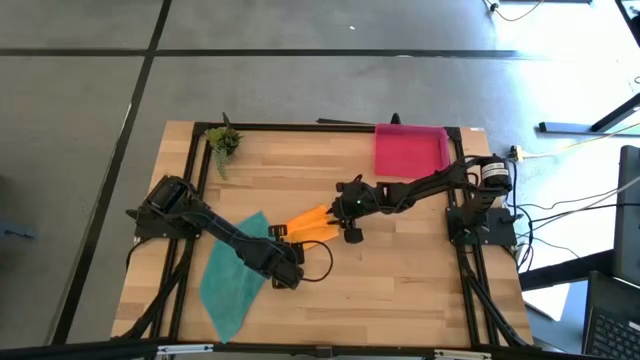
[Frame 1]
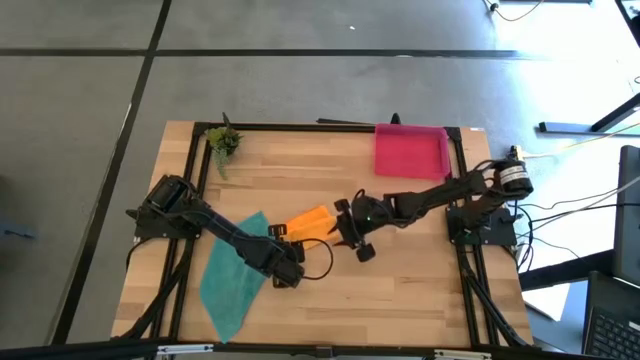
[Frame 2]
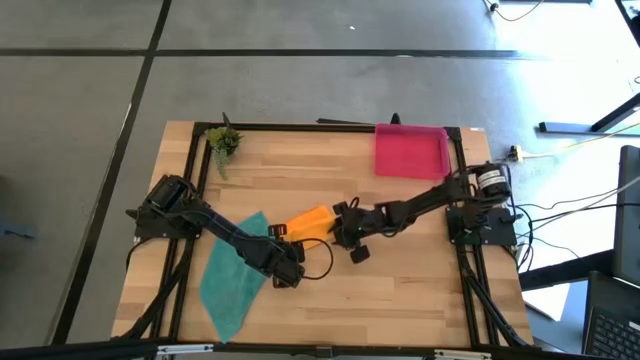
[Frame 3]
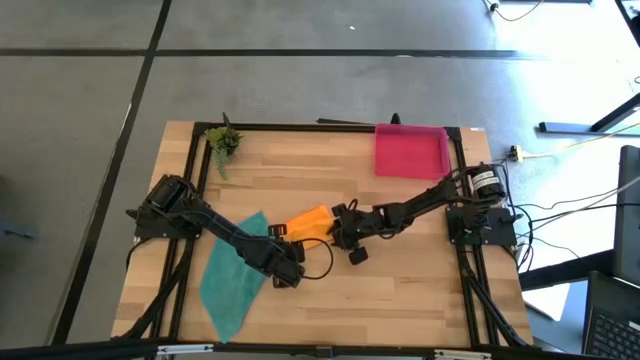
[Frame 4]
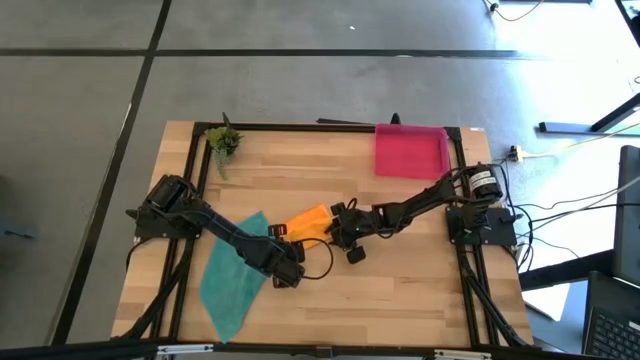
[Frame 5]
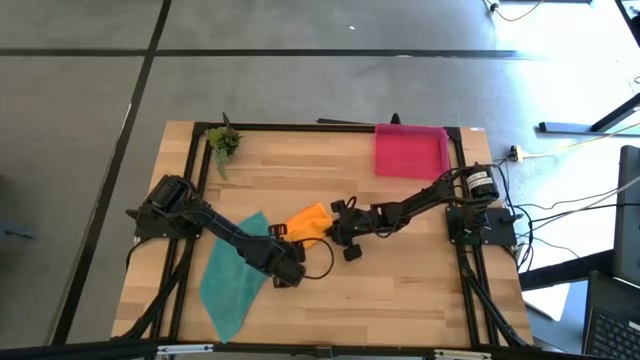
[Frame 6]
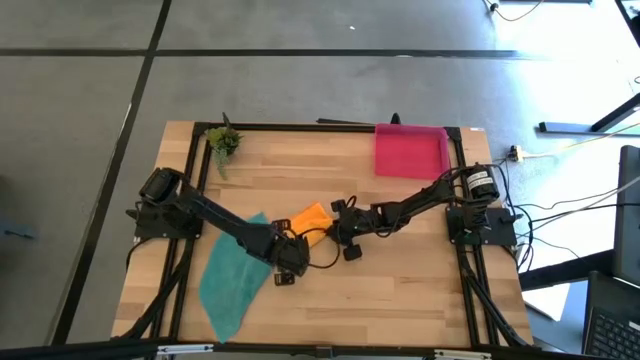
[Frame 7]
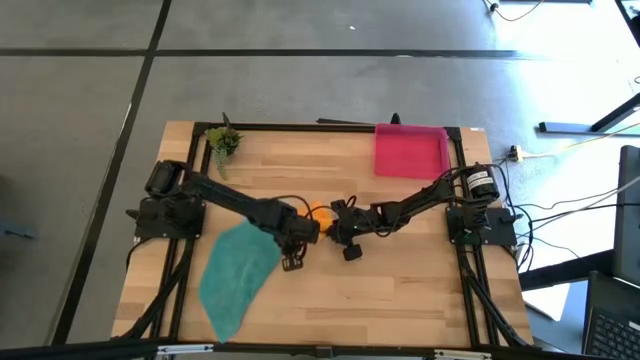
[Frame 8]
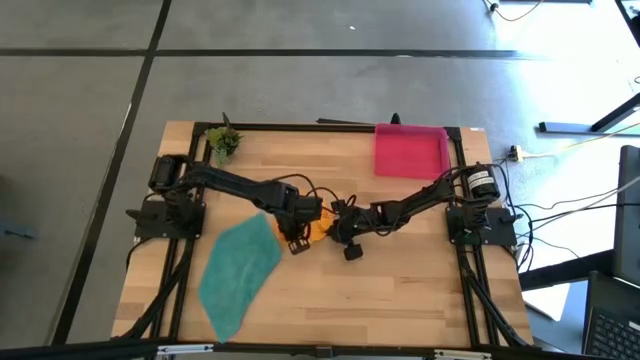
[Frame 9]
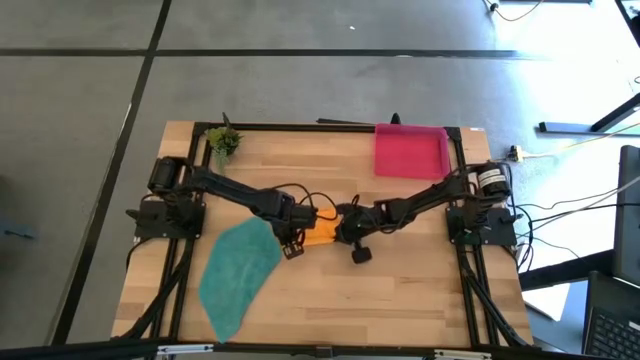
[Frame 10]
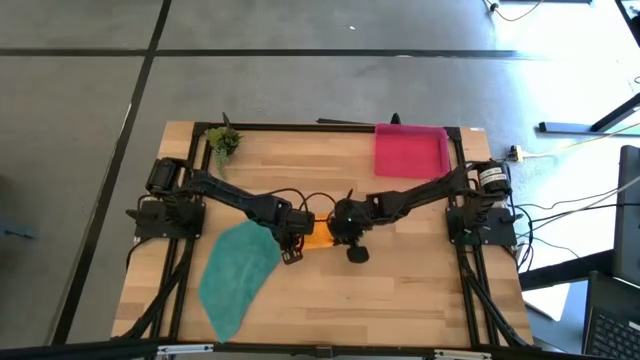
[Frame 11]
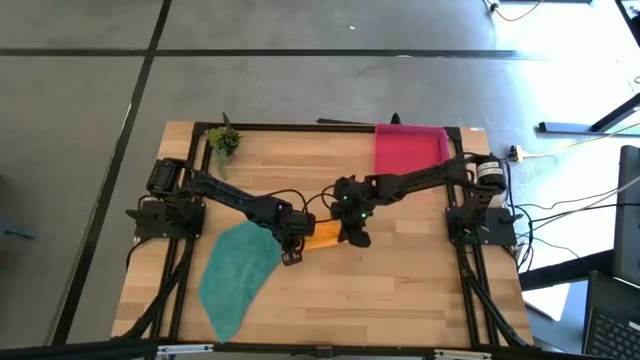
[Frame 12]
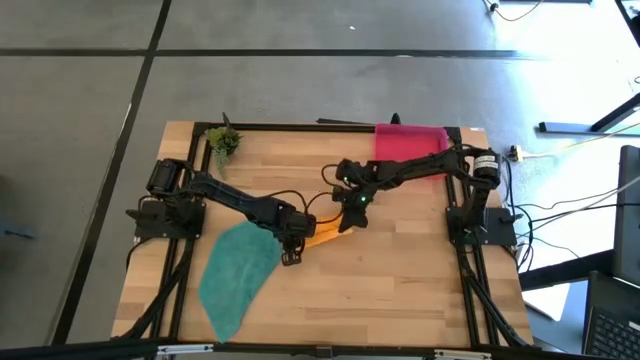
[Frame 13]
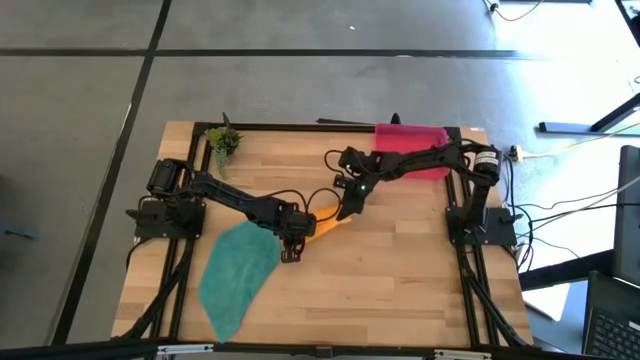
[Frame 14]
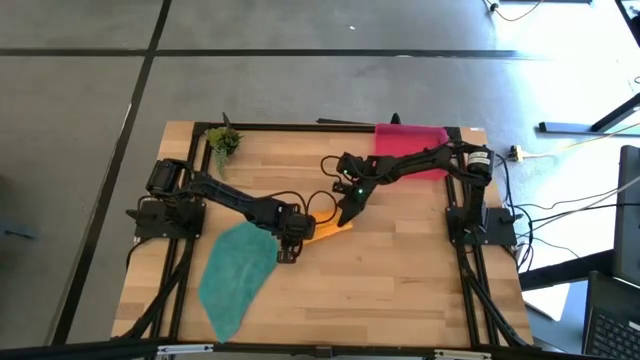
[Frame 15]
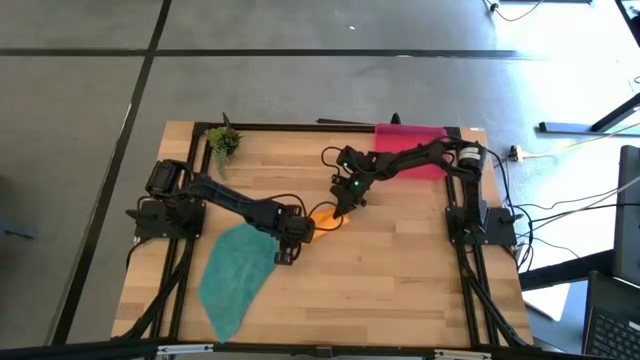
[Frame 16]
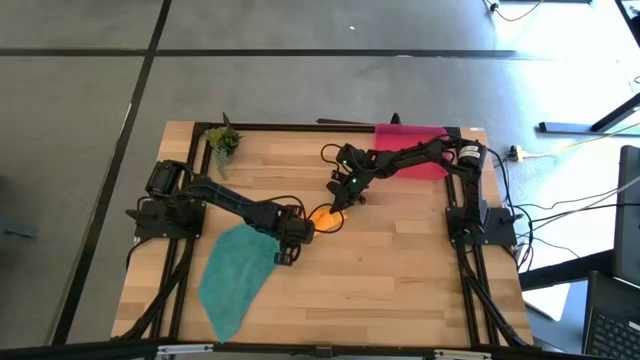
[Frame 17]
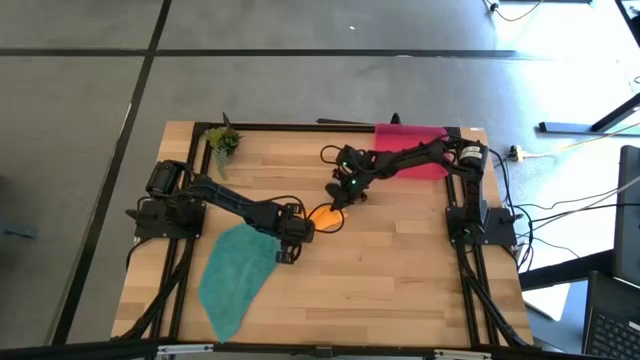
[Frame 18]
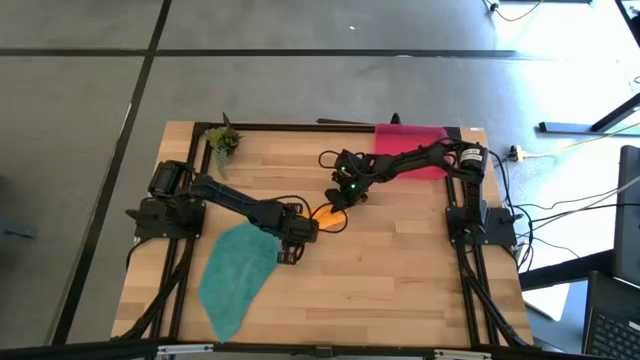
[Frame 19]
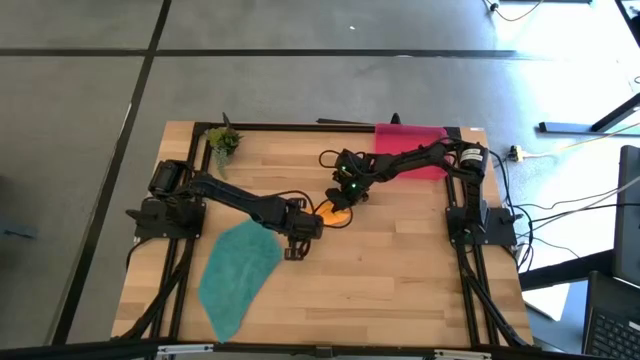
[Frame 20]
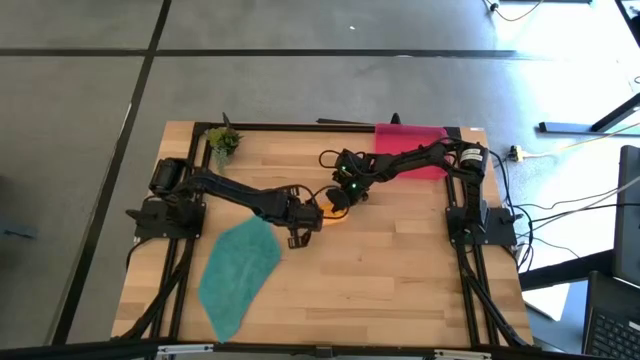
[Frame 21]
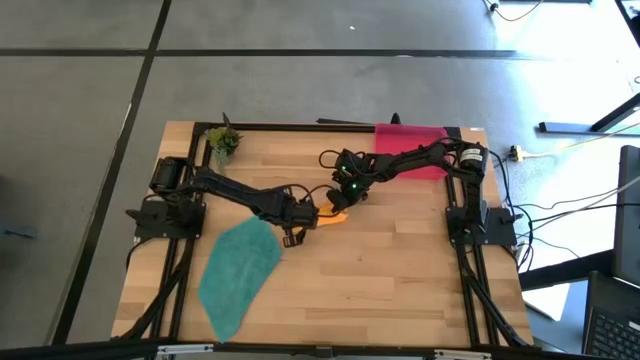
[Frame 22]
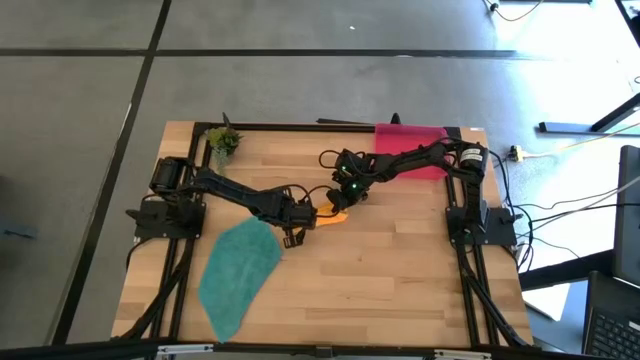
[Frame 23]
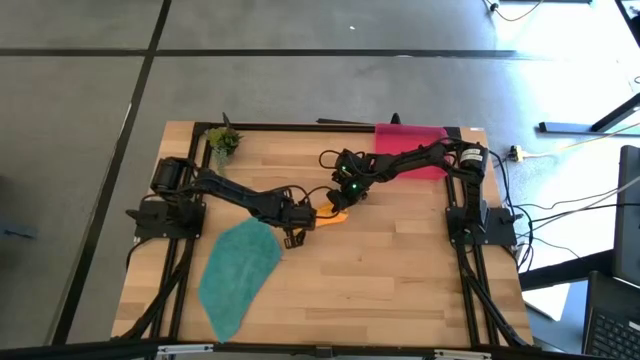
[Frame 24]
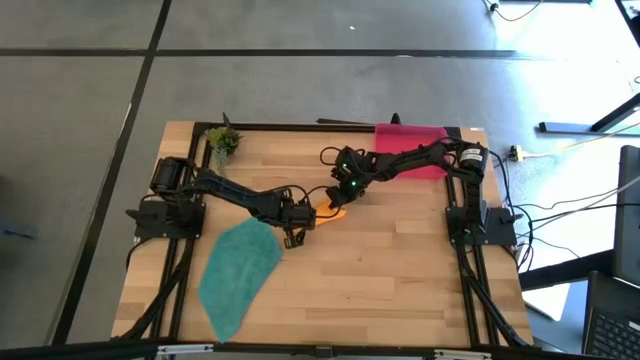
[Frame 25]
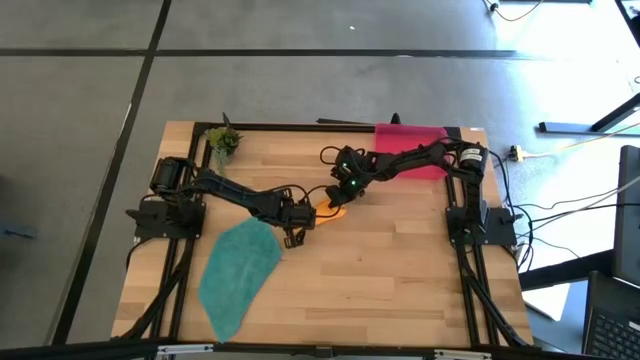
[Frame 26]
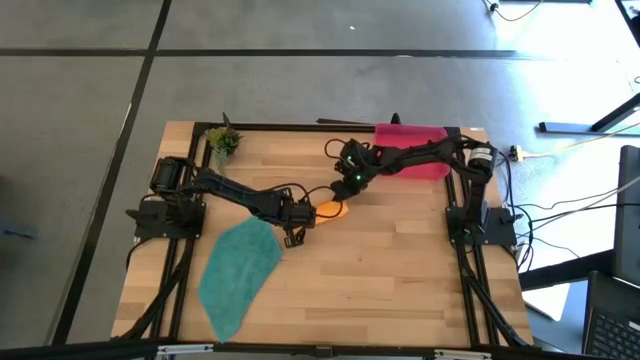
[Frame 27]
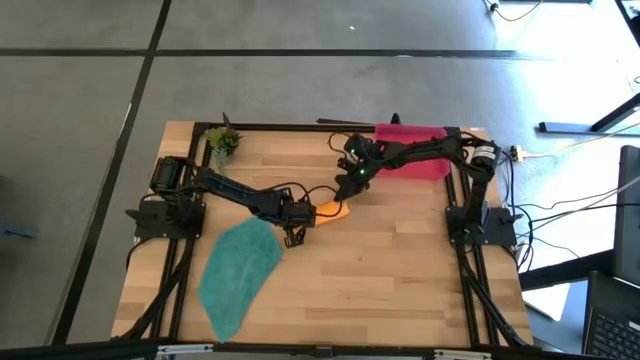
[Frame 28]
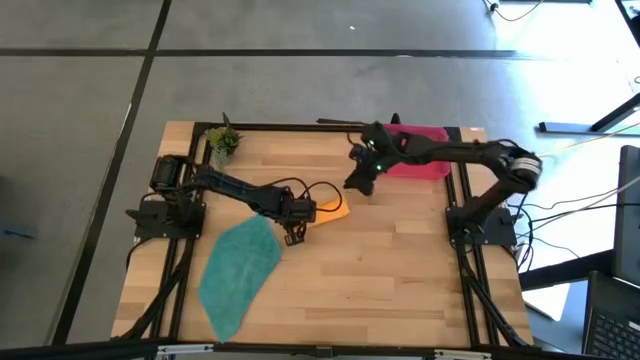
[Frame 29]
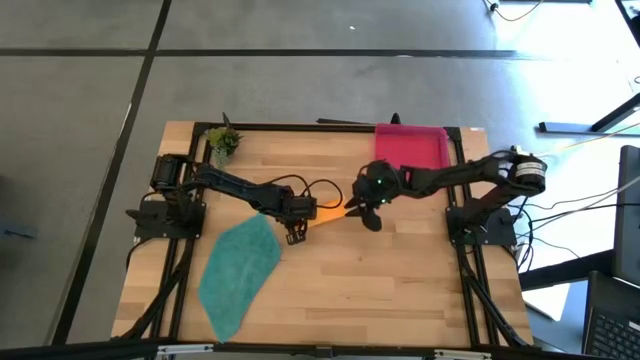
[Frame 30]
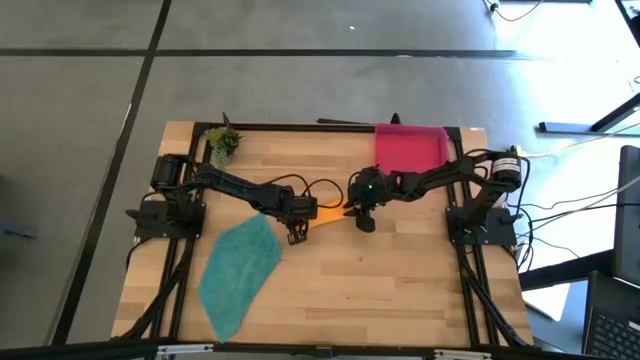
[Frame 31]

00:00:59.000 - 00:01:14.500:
Task: Roll microfiber towels into tight, uniform cylinder then place into a basket
Roll the folded orange microfiber towel
